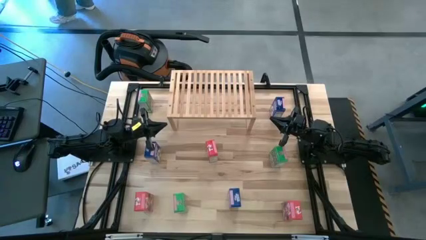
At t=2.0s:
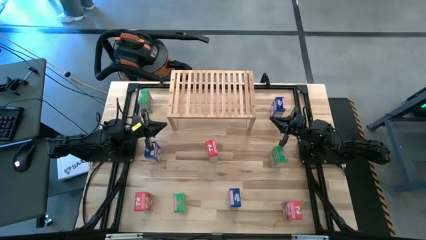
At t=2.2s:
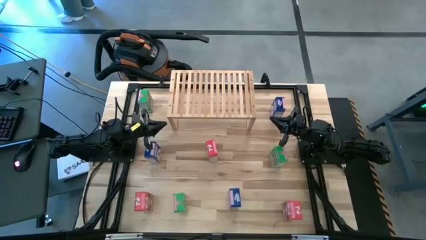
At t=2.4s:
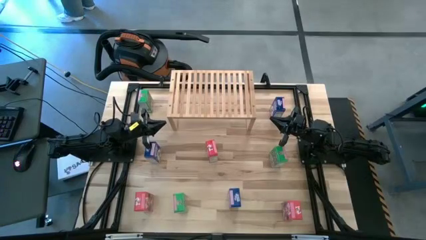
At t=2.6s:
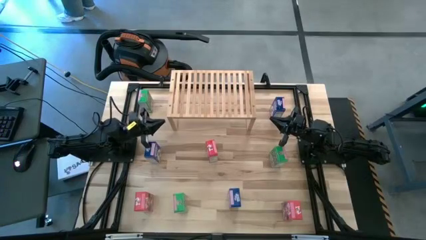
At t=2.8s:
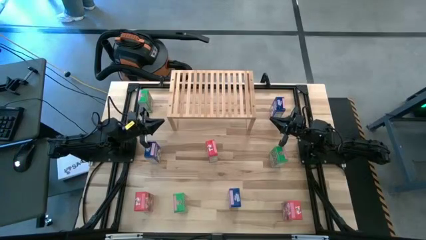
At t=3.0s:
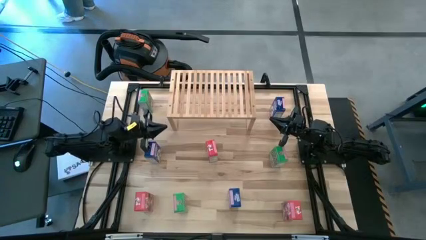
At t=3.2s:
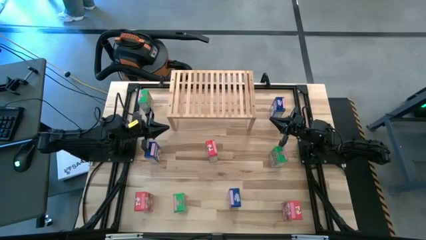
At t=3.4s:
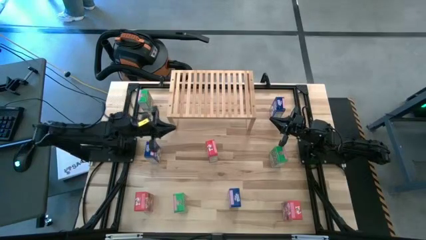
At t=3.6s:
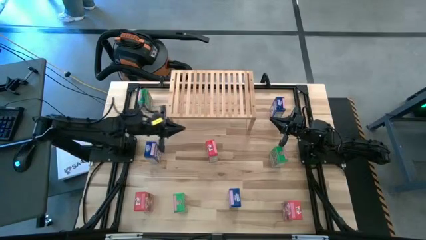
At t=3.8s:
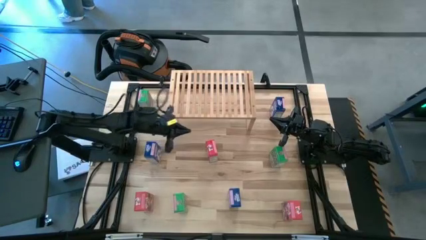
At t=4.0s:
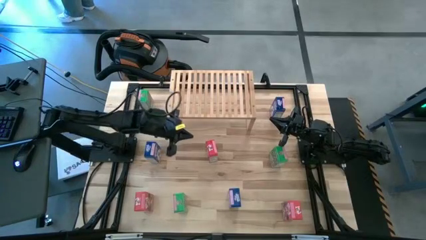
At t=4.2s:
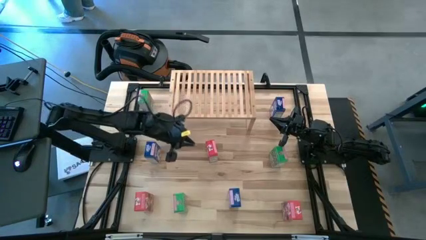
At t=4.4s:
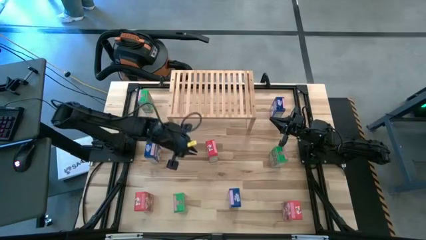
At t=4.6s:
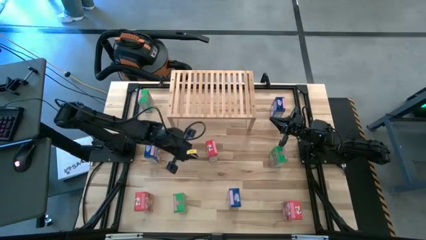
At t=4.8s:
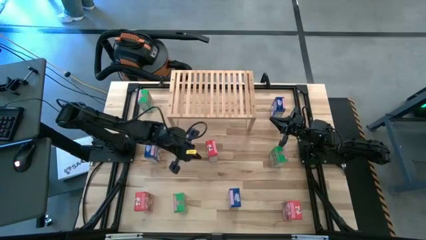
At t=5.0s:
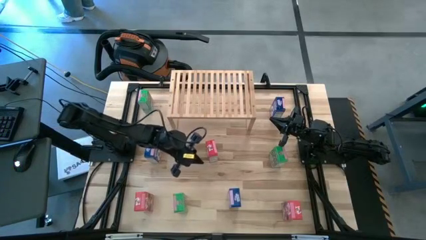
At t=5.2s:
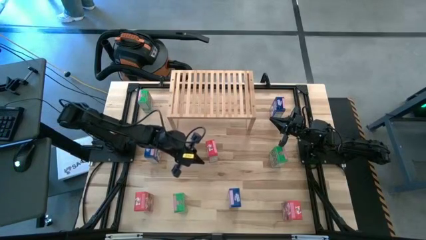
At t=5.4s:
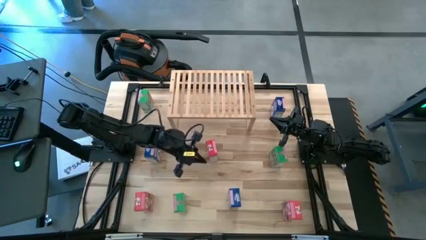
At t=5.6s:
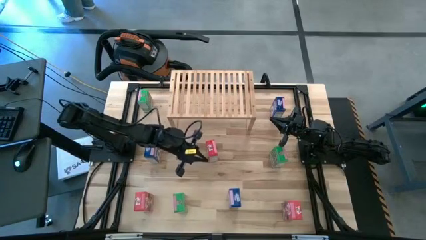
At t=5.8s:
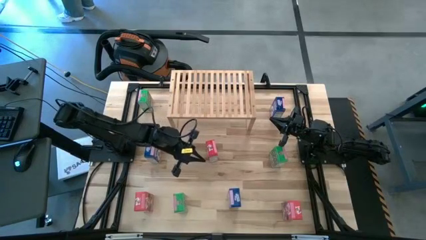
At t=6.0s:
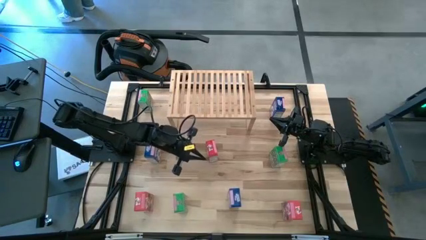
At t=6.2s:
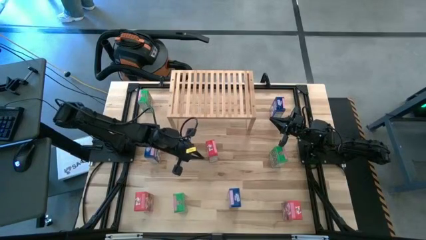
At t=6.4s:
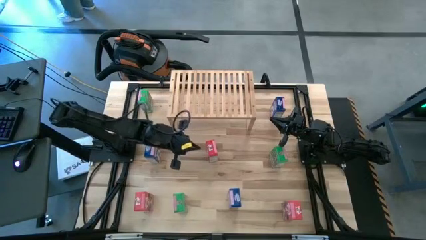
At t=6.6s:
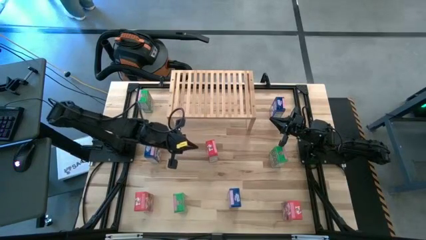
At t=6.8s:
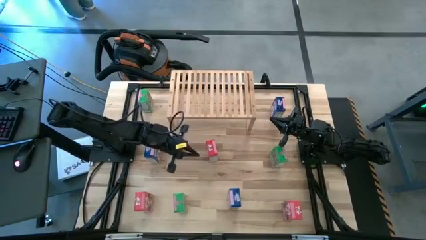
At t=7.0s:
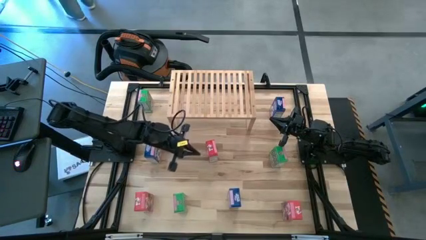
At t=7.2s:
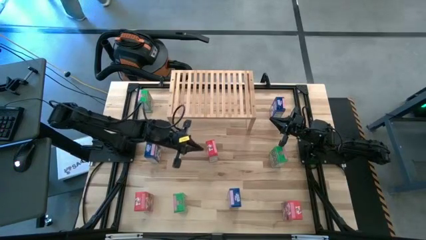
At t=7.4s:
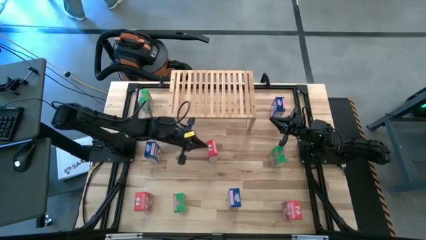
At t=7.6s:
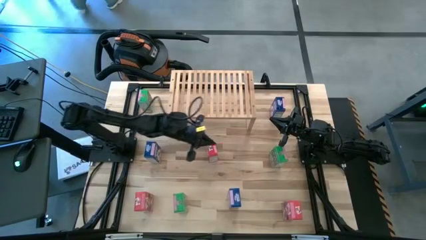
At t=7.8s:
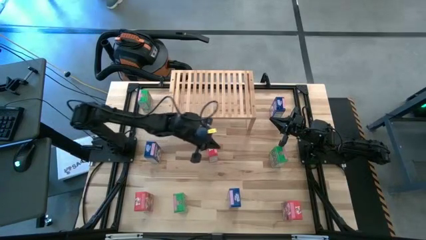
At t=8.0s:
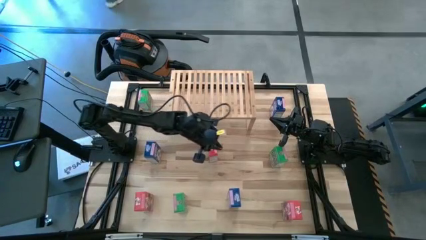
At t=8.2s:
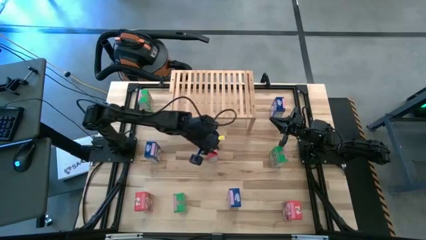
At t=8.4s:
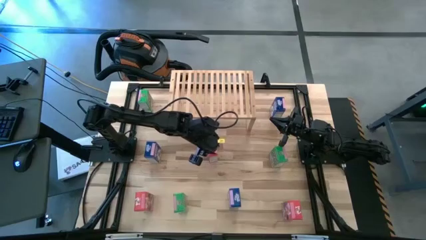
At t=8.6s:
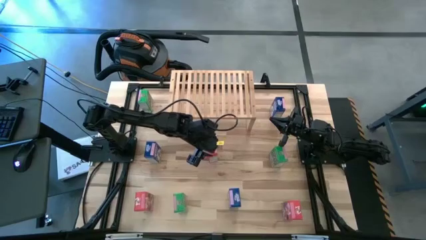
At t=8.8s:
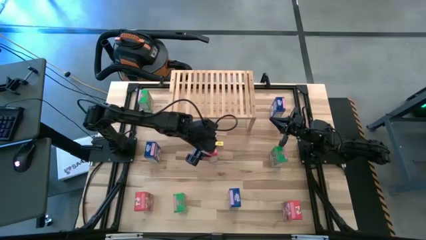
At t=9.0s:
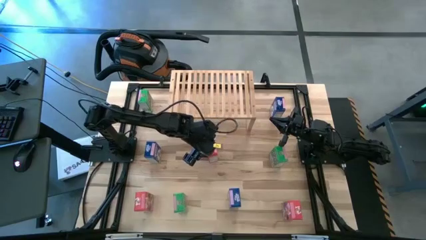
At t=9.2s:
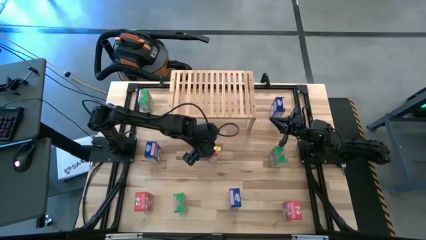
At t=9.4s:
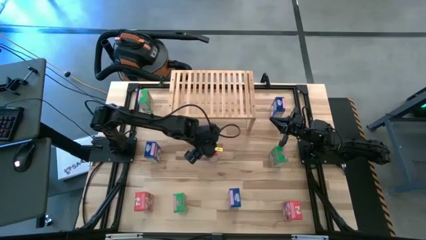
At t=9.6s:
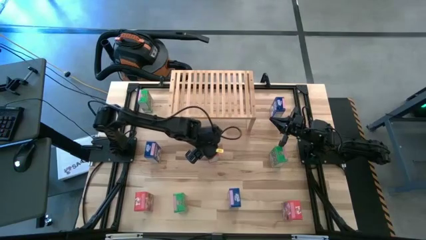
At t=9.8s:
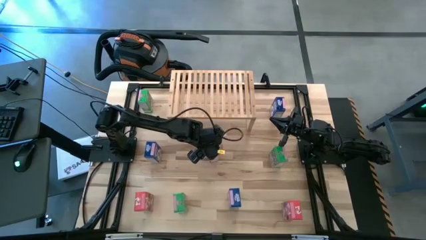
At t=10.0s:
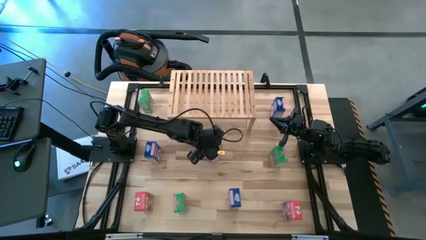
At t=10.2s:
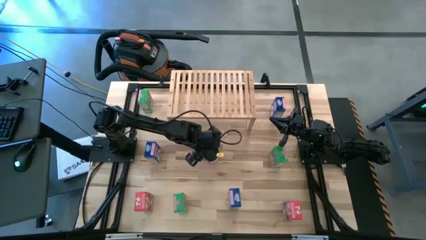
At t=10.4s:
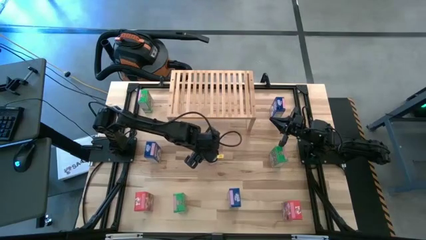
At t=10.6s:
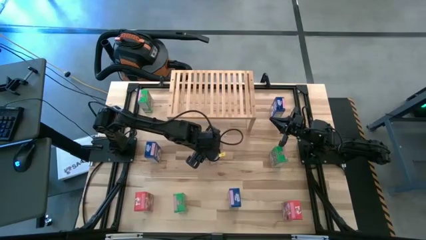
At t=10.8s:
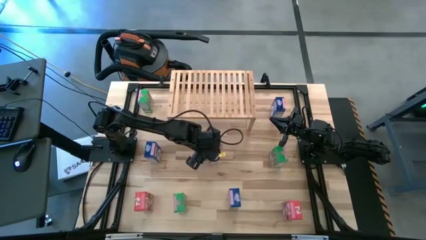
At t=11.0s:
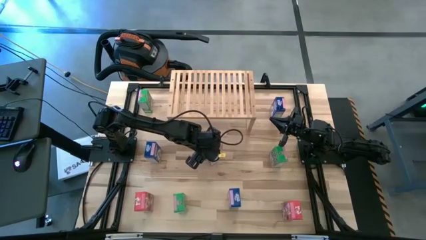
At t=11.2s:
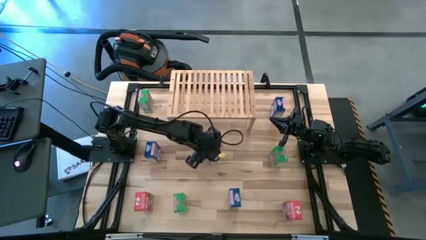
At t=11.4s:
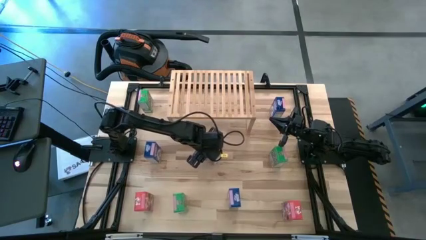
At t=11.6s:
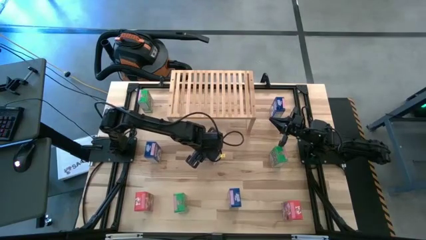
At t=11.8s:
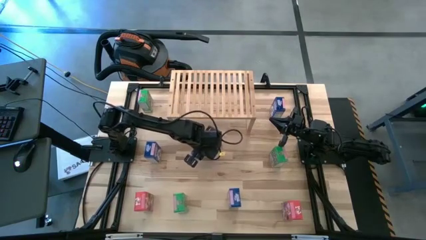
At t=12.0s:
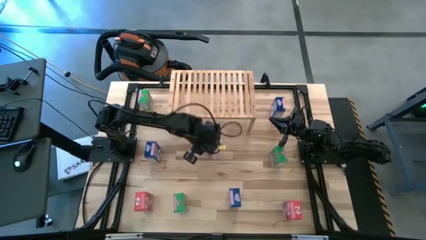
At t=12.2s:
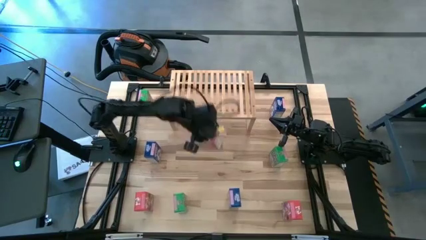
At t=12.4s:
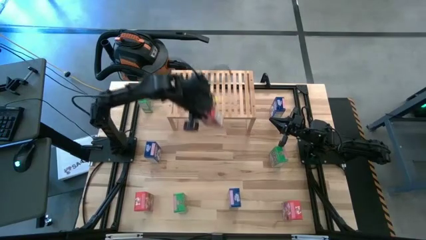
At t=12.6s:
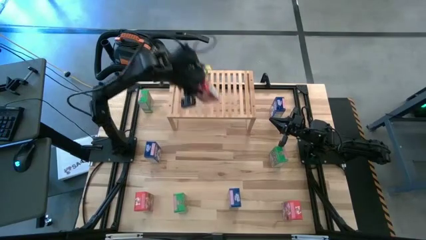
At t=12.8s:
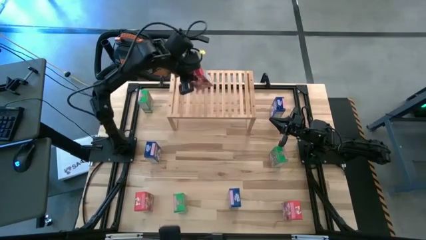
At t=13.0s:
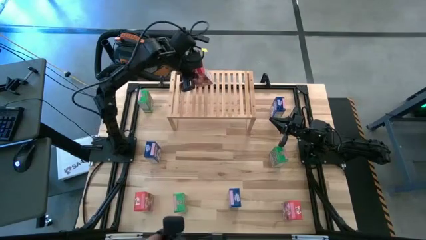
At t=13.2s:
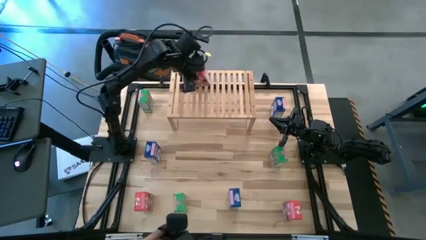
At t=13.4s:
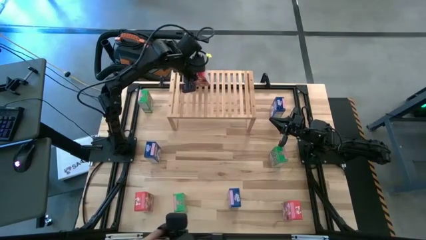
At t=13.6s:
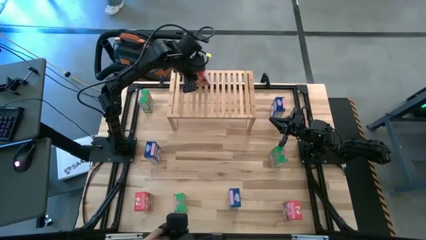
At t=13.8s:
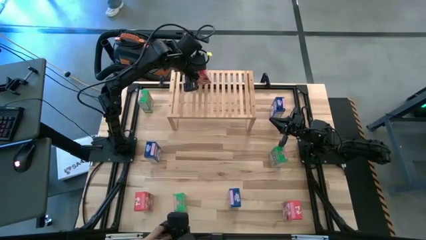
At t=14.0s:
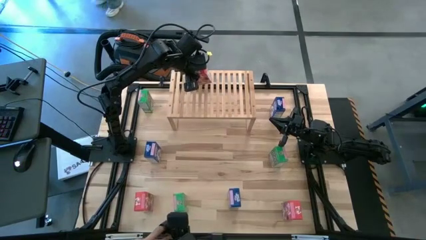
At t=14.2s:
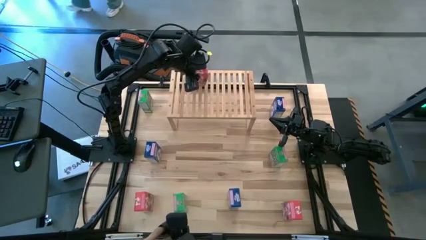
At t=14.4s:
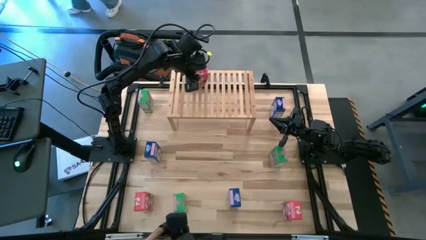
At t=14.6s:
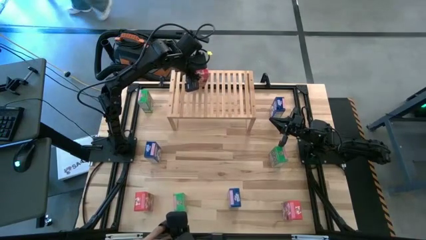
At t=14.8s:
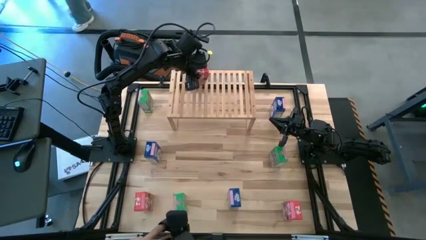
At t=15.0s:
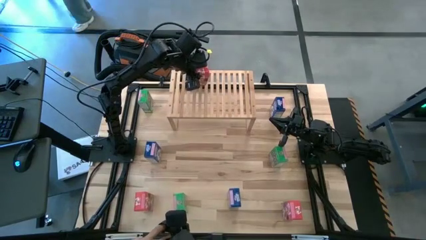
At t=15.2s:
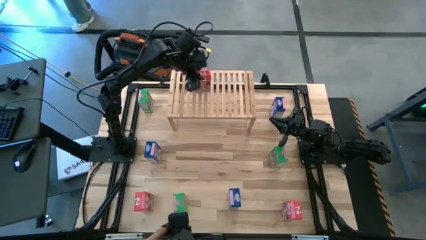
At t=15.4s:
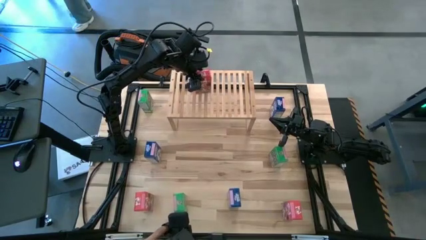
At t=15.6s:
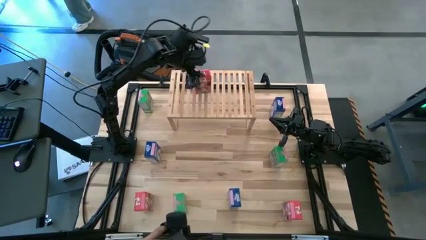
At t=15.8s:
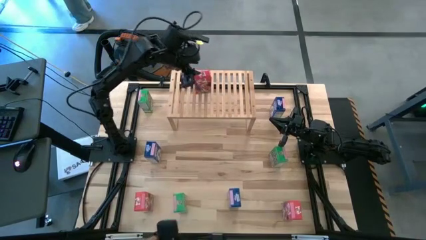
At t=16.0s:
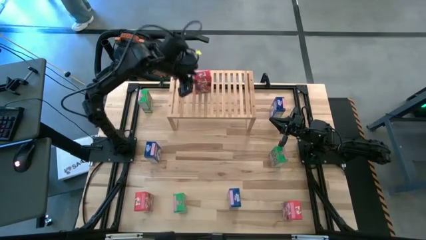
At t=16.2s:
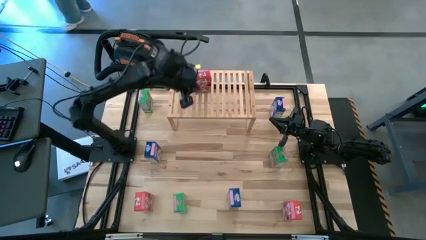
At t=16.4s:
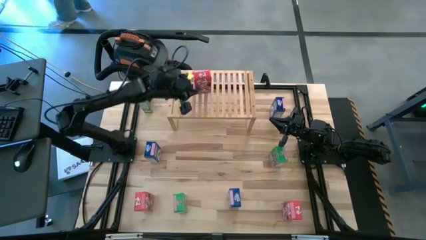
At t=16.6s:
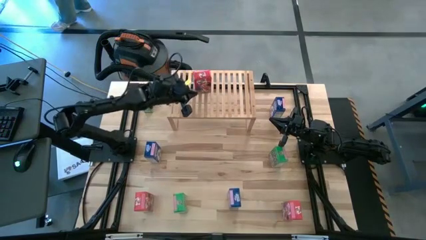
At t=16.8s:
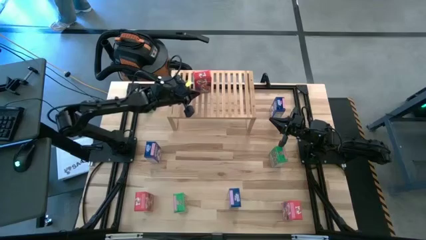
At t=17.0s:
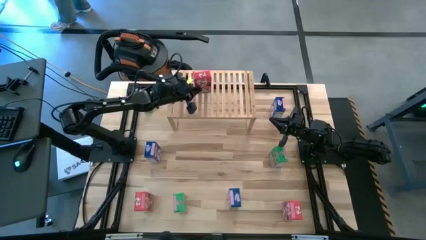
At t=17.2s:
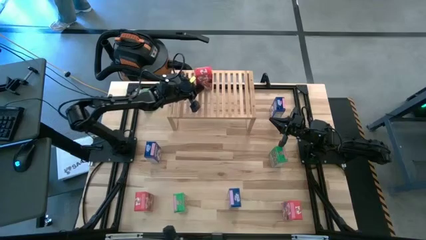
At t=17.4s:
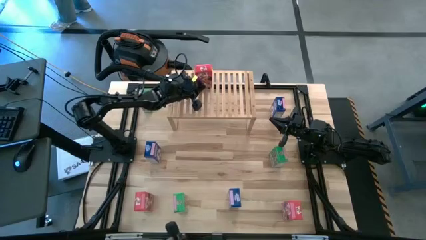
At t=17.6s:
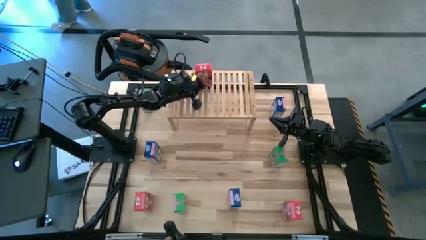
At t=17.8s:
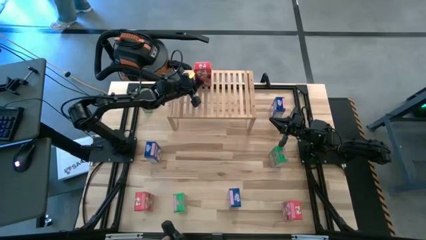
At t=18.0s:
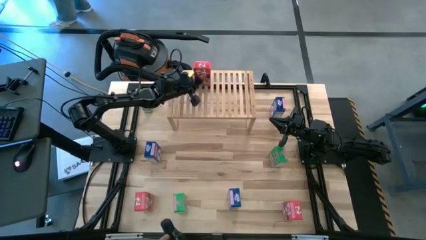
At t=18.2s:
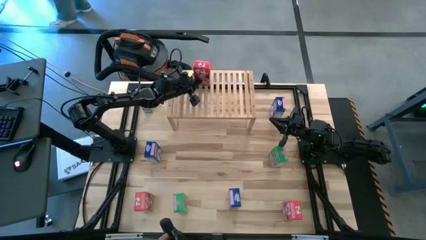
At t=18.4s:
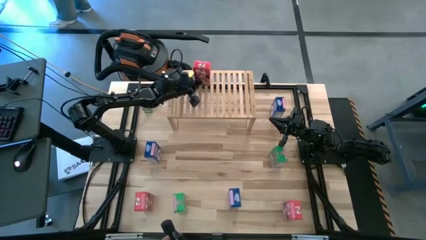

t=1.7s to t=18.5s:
Task: Stack cereal on shelf
Put the top red cereal box on the shelf
